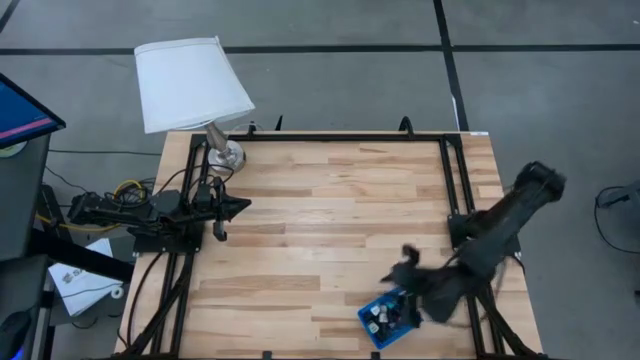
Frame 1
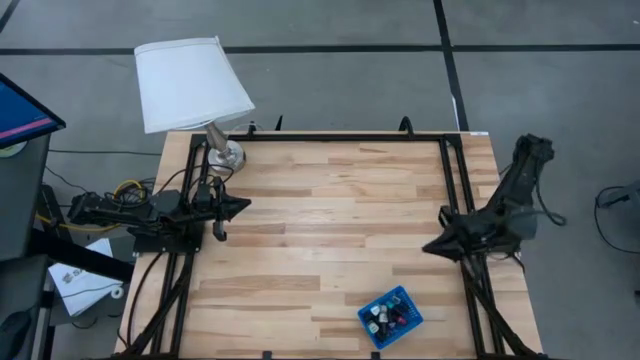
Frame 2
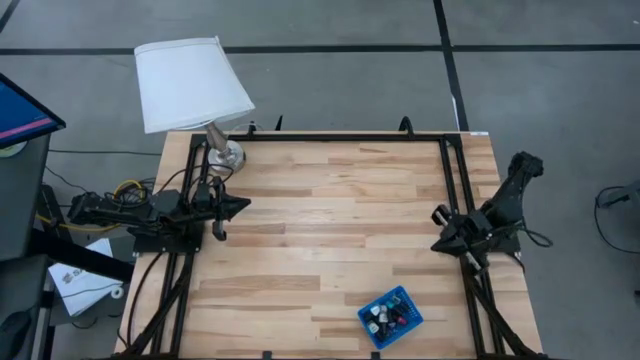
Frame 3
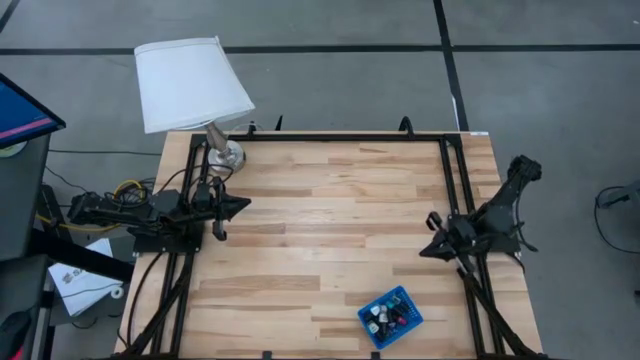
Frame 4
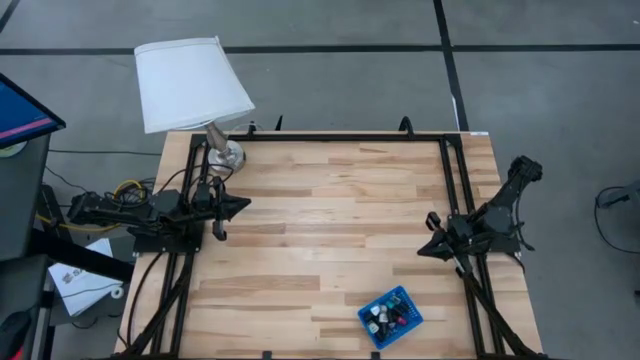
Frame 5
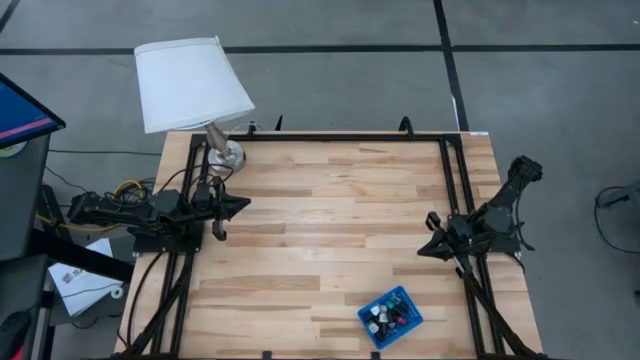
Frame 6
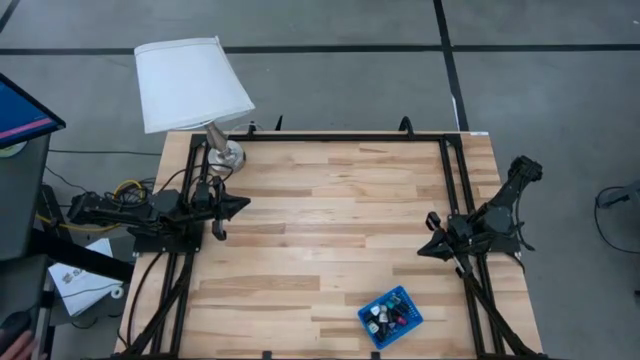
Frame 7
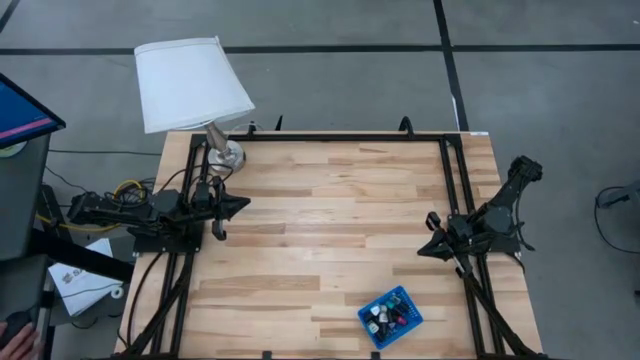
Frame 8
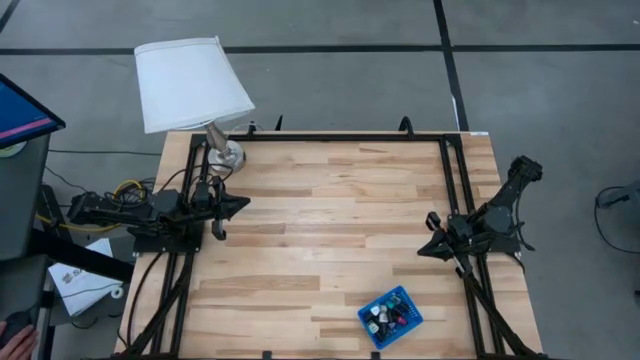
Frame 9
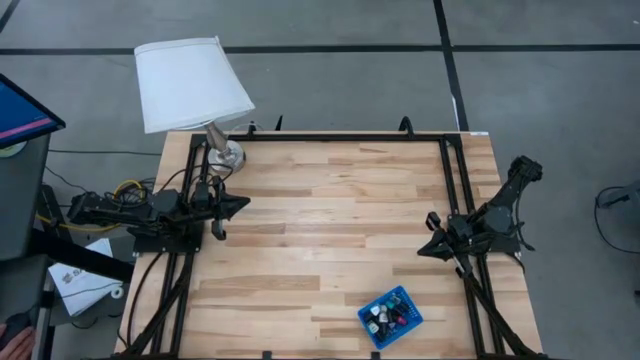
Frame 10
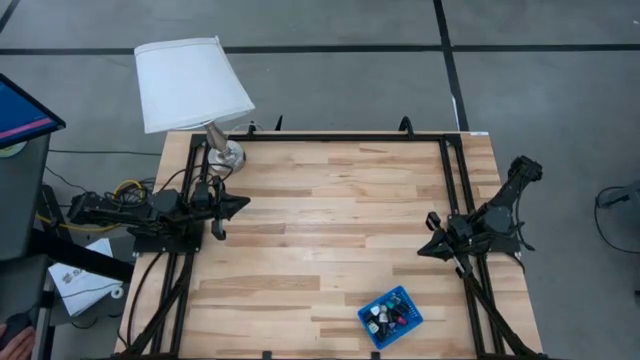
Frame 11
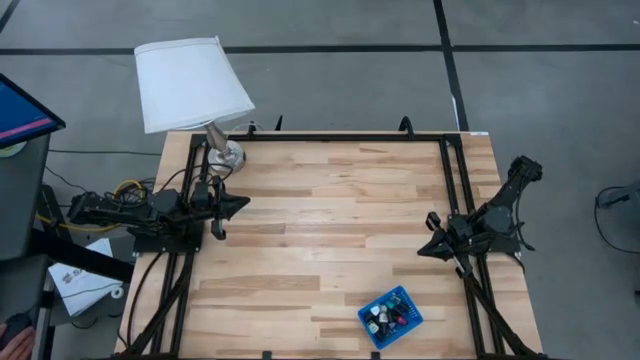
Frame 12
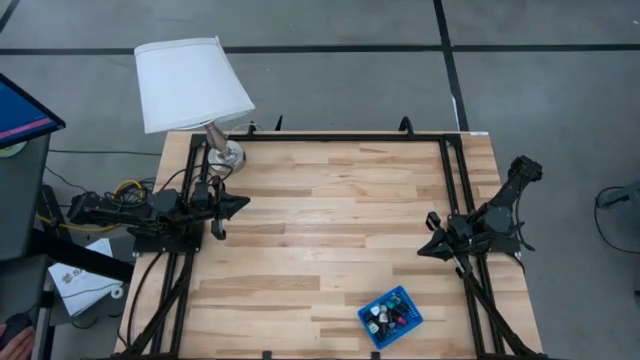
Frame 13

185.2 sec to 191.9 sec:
Task: Pick & Place Nail Polish
Return to Home Position

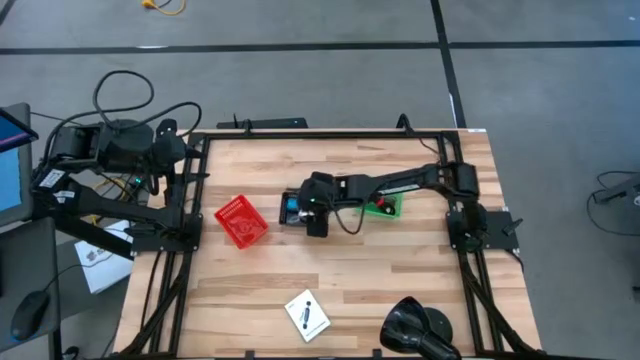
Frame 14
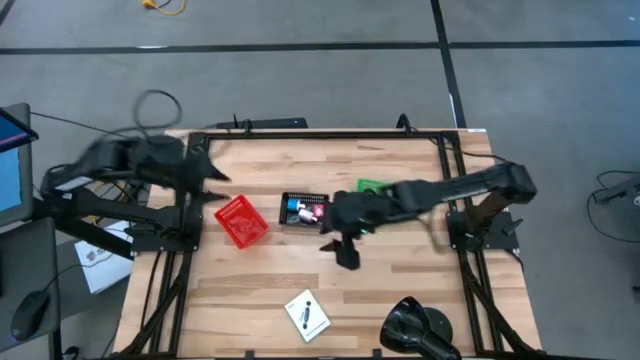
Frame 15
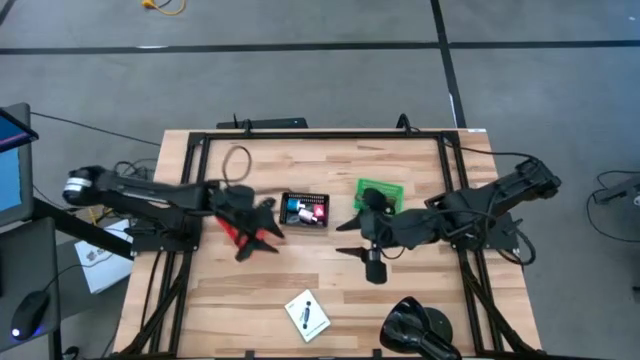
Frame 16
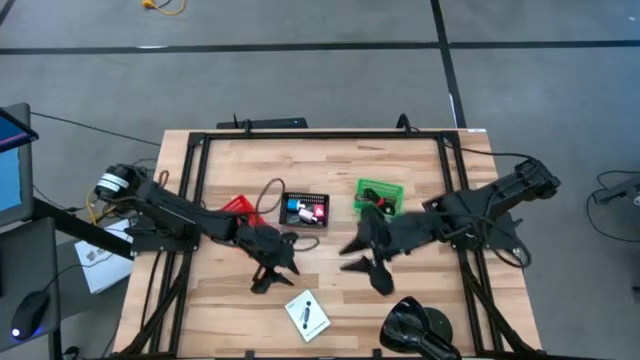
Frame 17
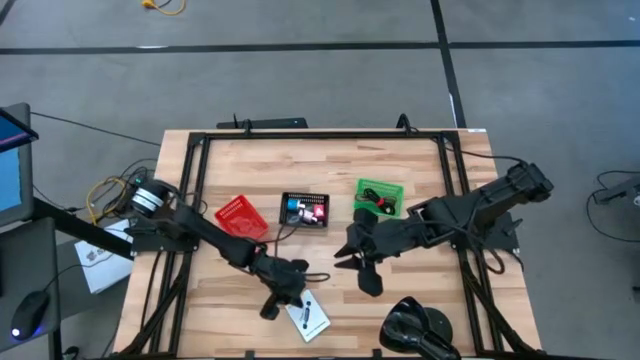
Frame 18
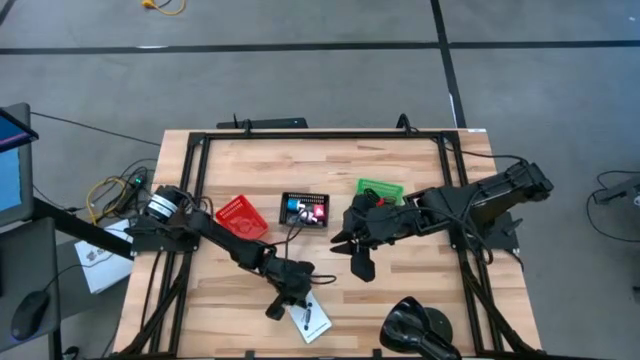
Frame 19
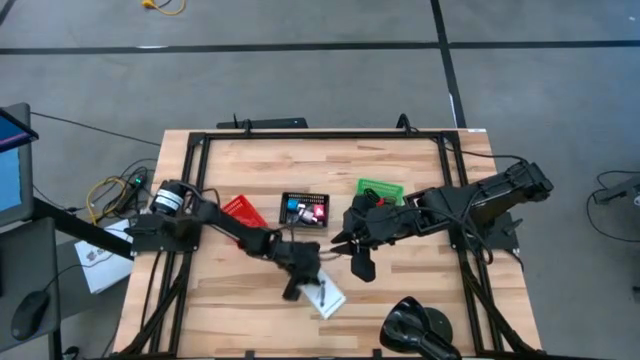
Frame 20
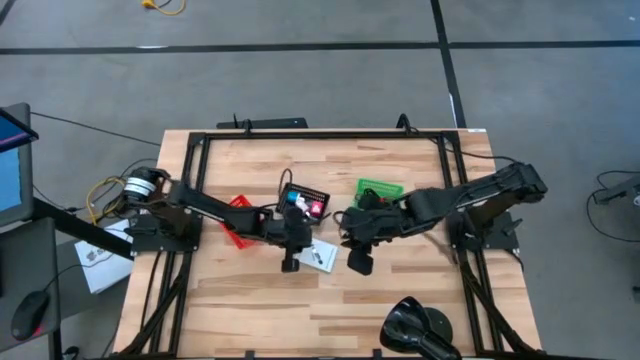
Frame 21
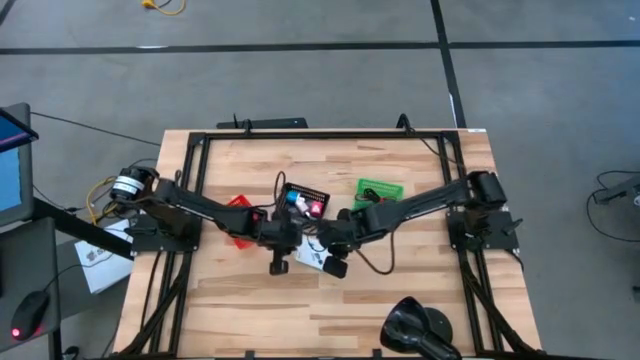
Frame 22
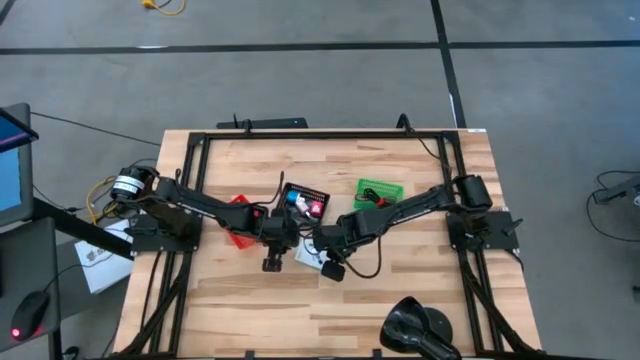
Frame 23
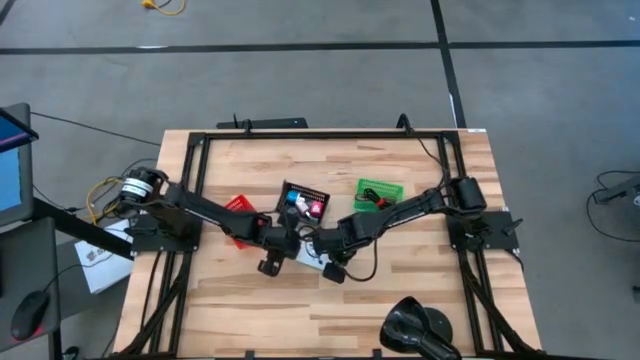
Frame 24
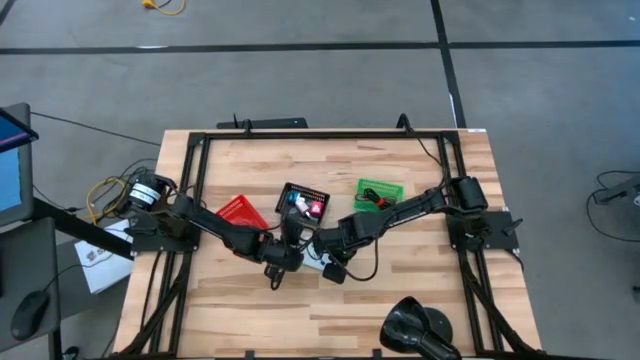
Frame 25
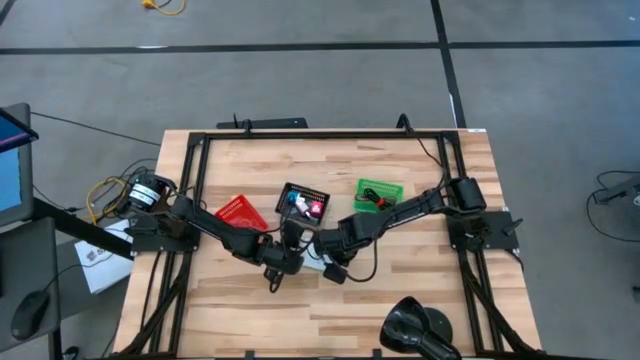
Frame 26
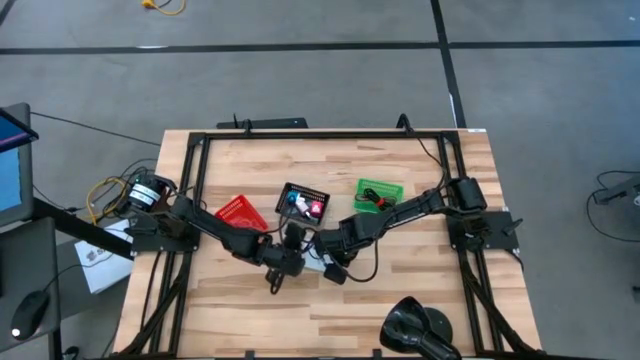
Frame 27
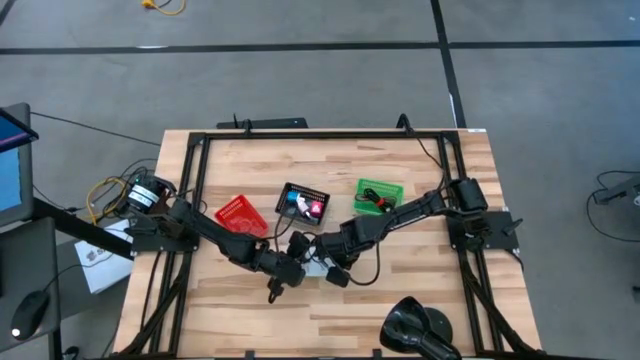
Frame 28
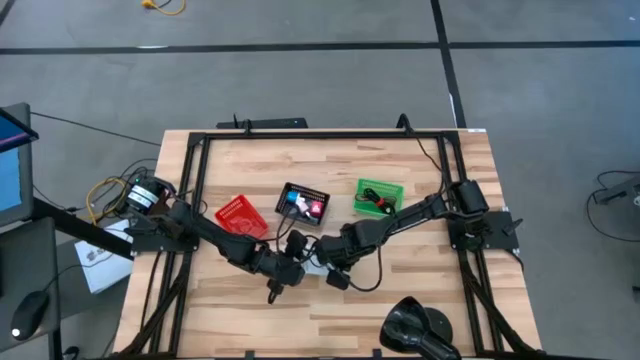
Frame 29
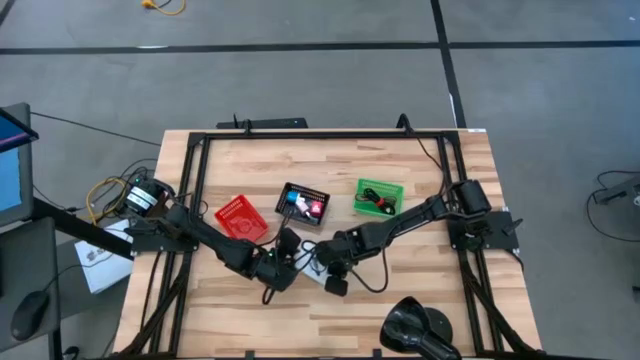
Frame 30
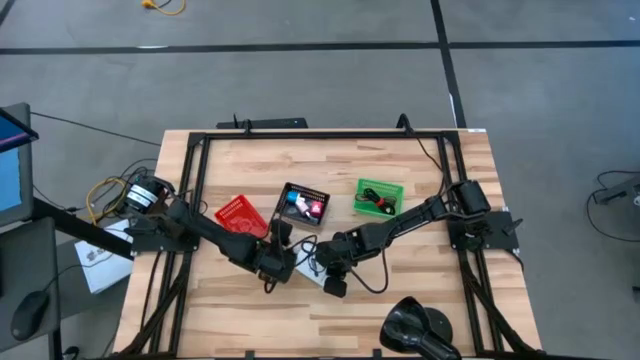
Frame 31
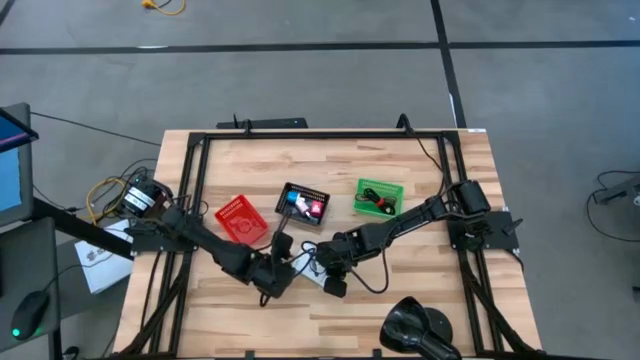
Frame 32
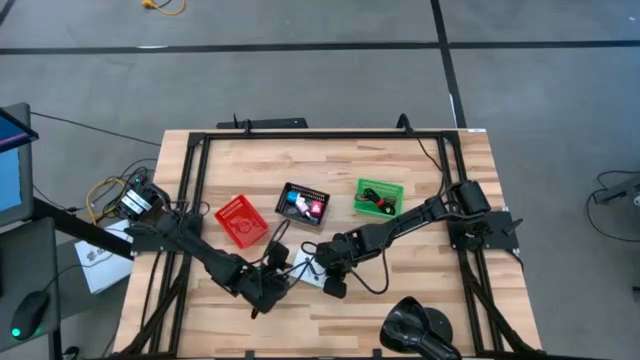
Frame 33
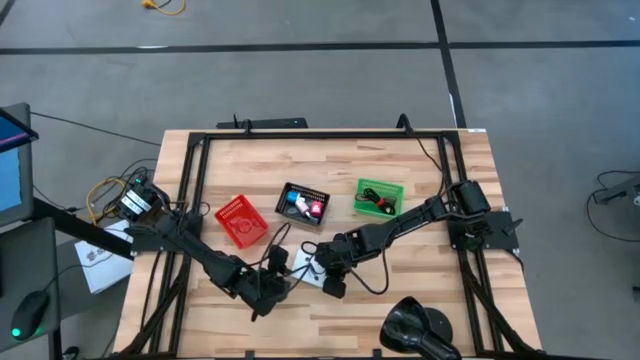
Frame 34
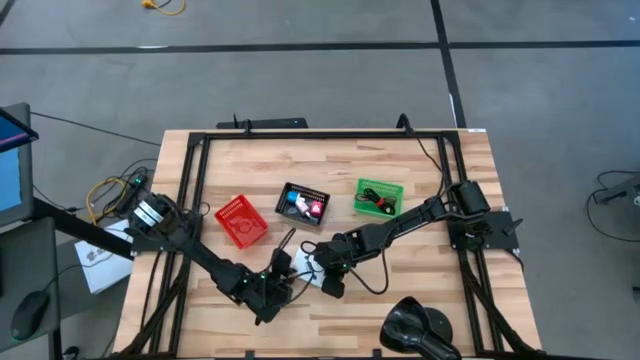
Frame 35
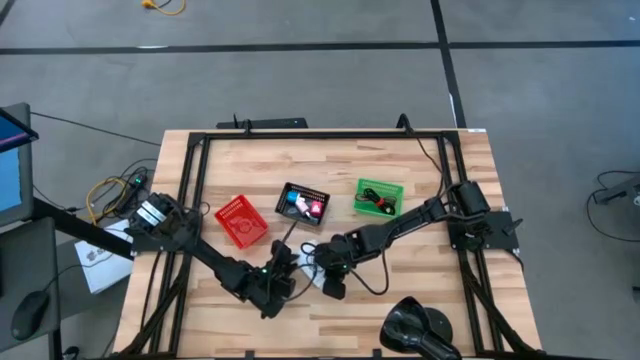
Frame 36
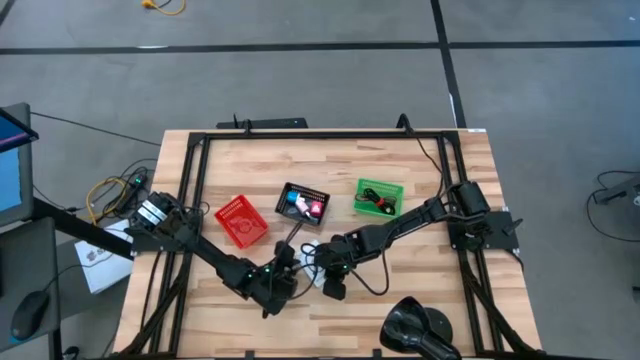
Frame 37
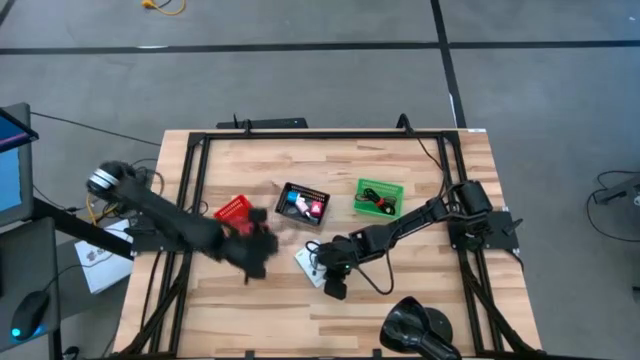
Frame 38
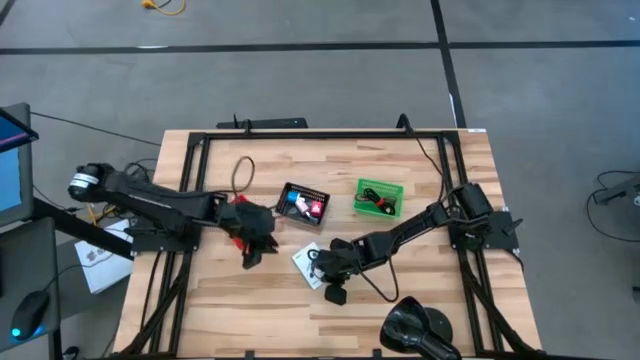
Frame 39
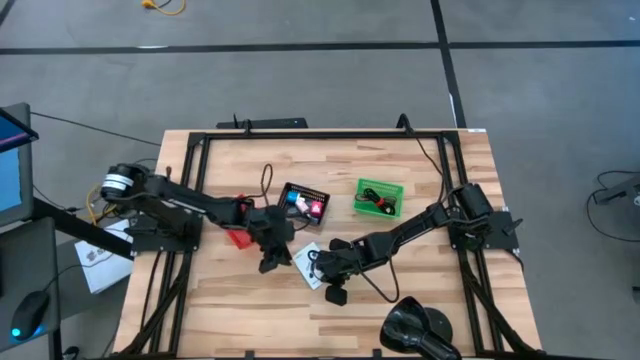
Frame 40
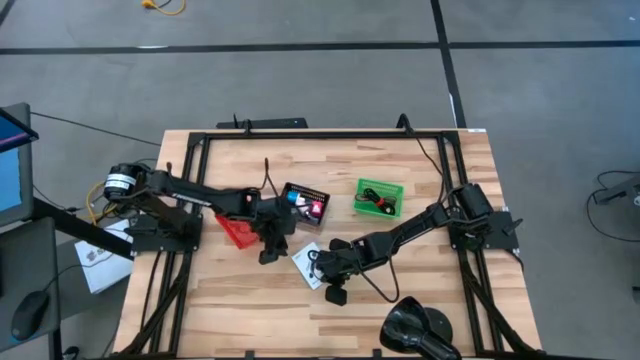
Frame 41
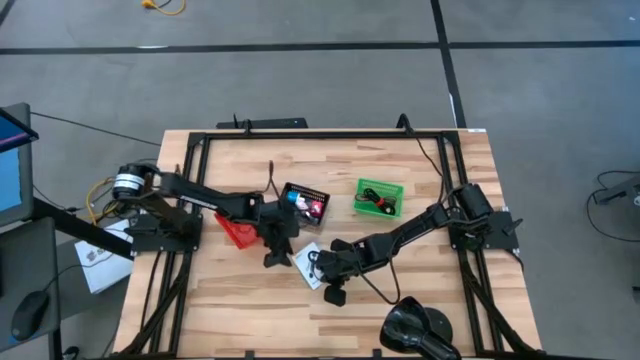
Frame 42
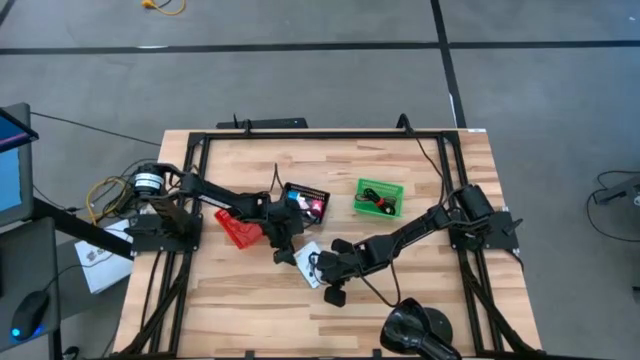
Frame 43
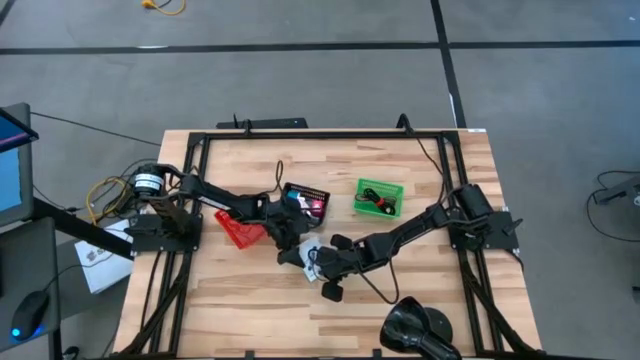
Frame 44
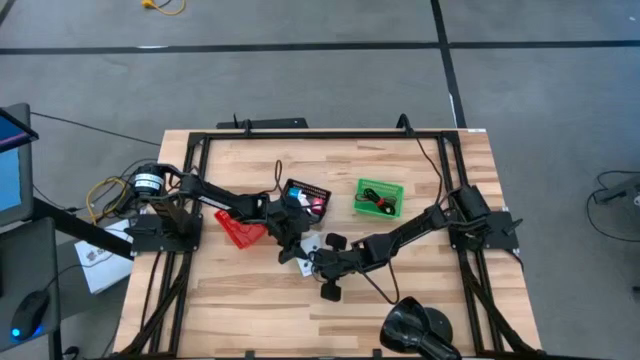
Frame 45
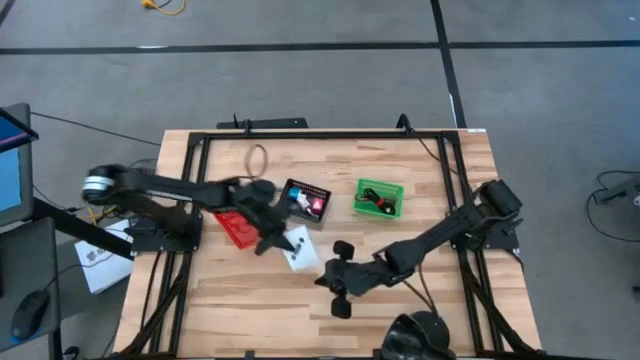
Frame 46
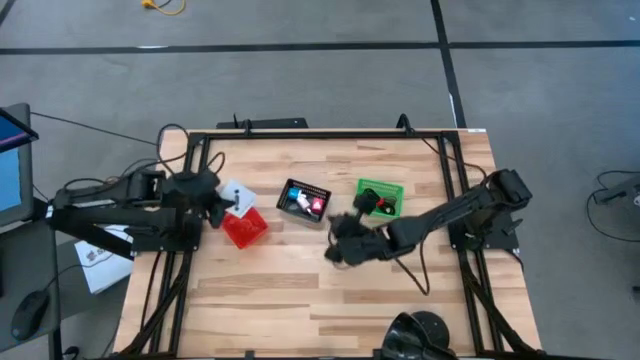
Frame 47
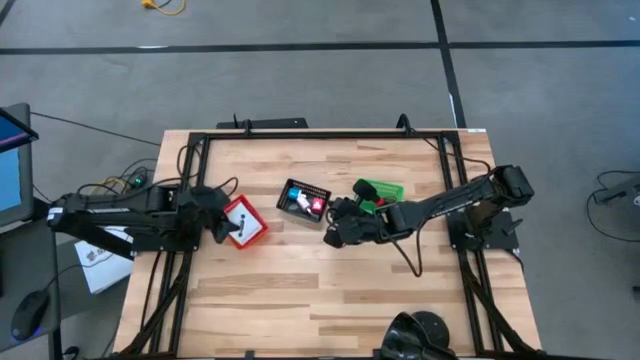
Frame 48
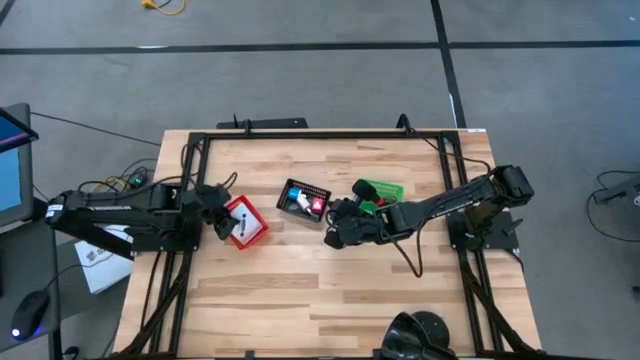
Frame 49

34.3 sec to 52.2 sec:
Task: Pick and place items into bin
Put the white card reader box into the red bin
